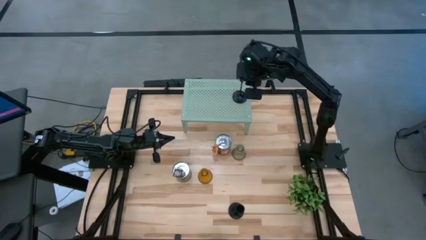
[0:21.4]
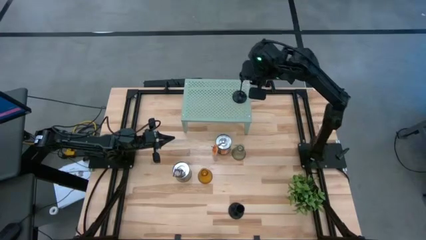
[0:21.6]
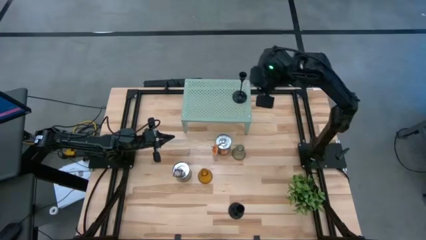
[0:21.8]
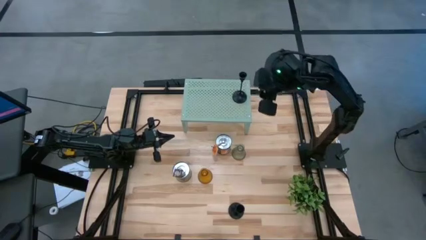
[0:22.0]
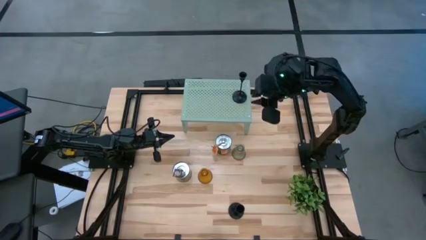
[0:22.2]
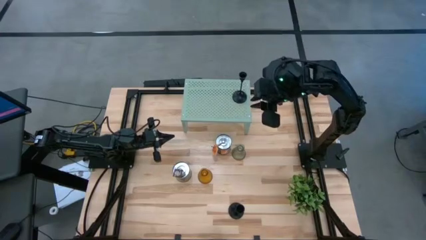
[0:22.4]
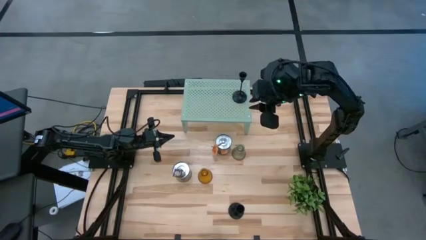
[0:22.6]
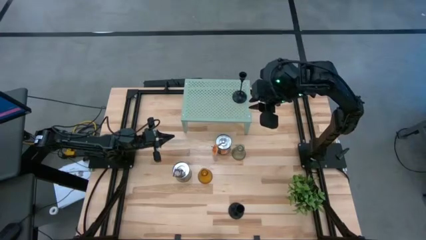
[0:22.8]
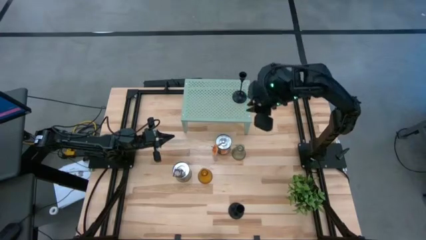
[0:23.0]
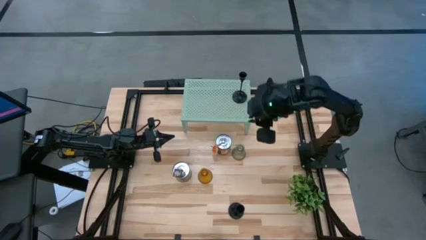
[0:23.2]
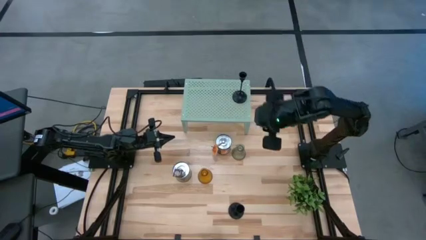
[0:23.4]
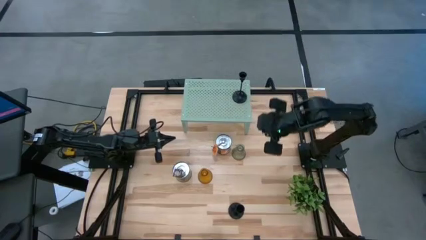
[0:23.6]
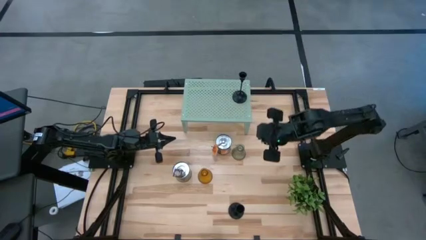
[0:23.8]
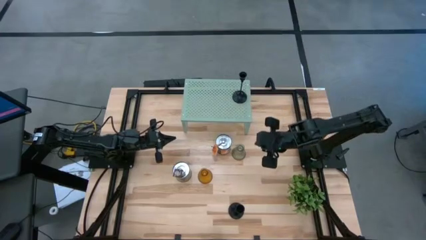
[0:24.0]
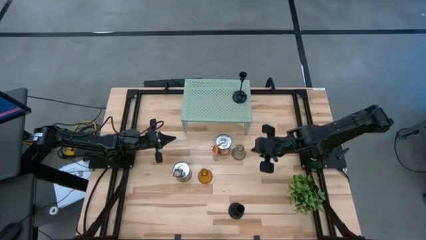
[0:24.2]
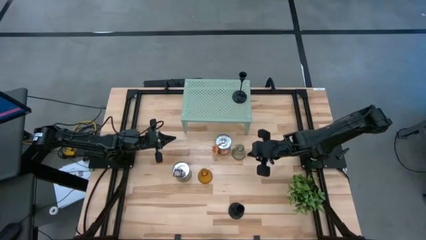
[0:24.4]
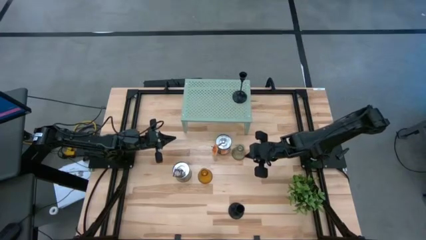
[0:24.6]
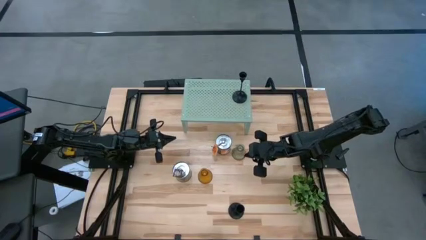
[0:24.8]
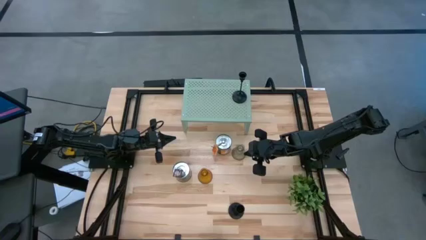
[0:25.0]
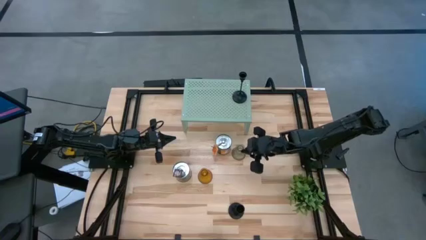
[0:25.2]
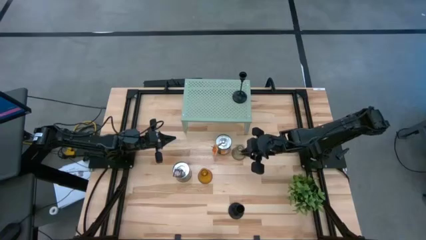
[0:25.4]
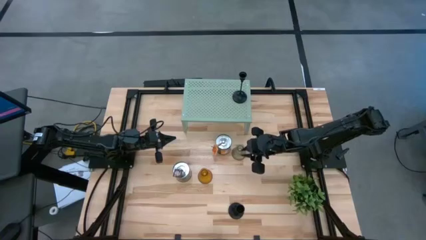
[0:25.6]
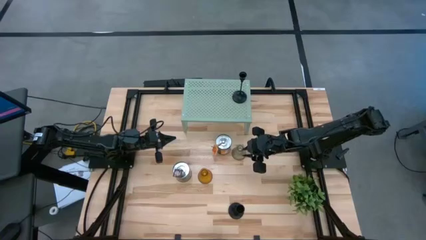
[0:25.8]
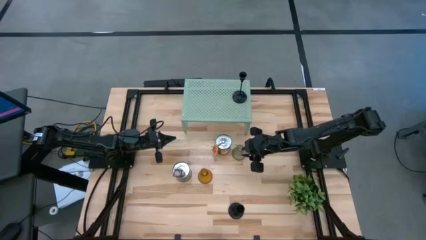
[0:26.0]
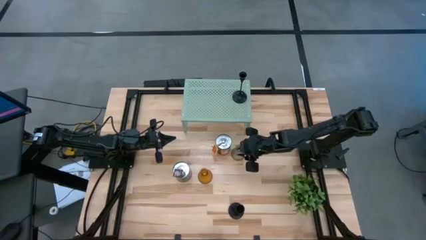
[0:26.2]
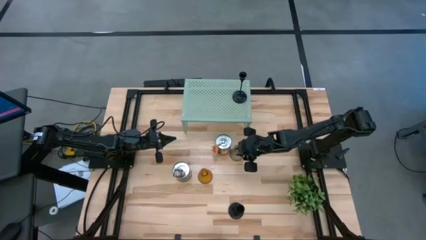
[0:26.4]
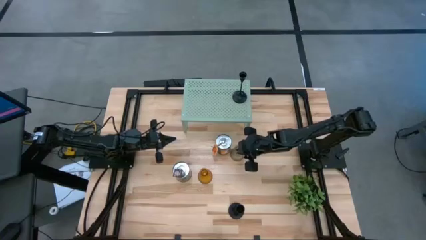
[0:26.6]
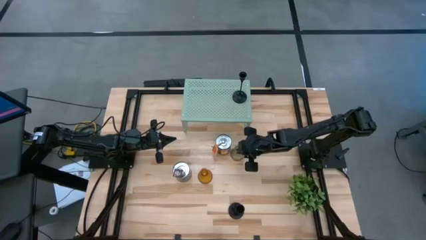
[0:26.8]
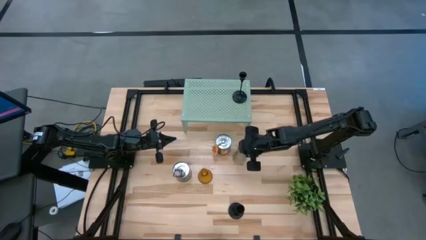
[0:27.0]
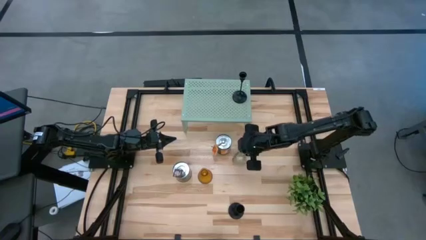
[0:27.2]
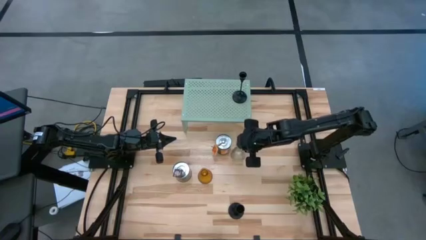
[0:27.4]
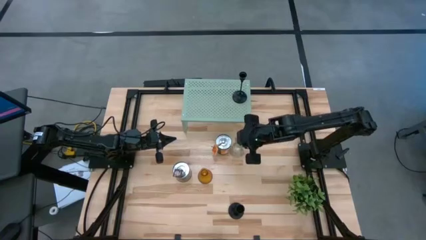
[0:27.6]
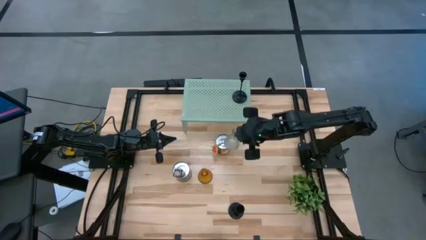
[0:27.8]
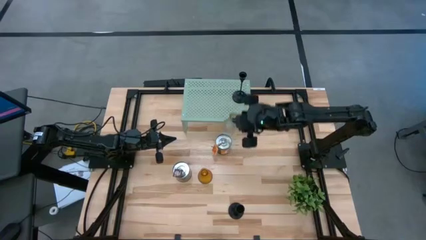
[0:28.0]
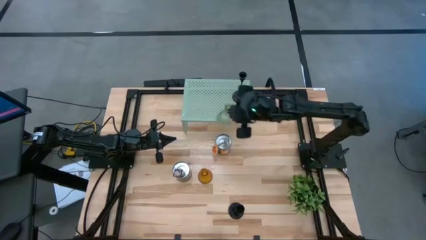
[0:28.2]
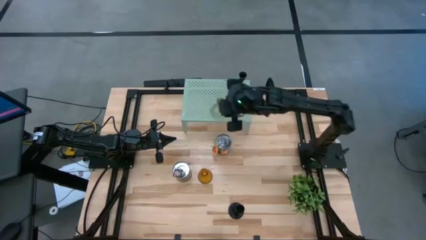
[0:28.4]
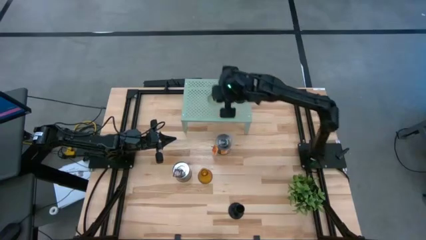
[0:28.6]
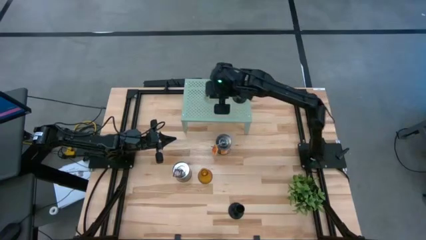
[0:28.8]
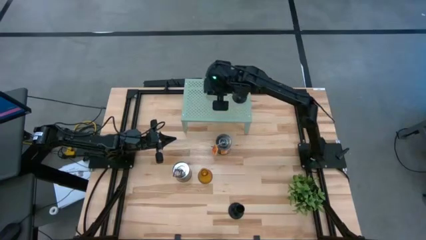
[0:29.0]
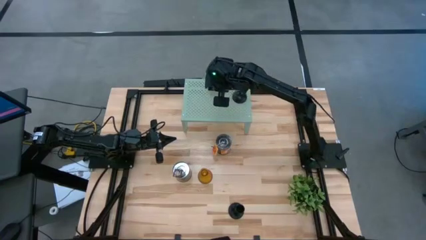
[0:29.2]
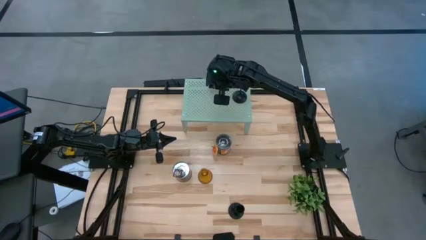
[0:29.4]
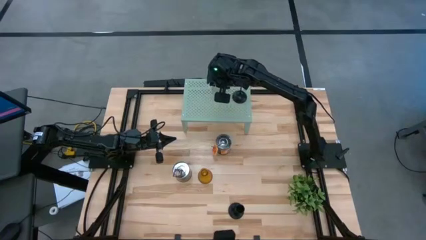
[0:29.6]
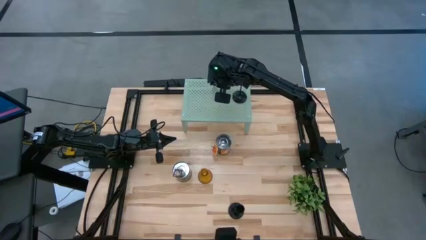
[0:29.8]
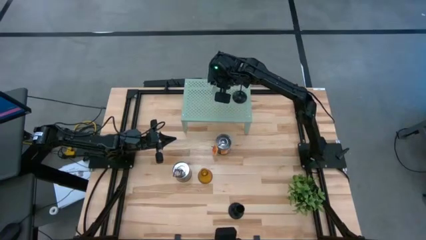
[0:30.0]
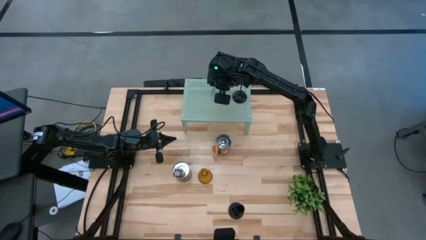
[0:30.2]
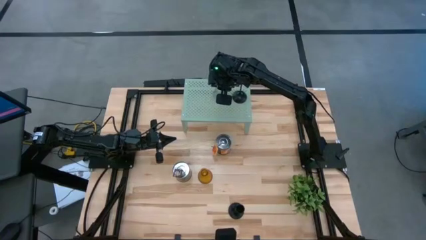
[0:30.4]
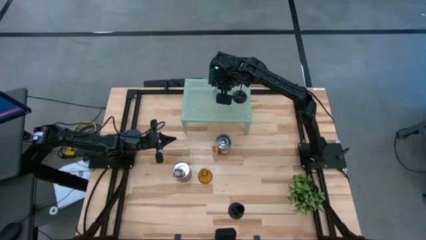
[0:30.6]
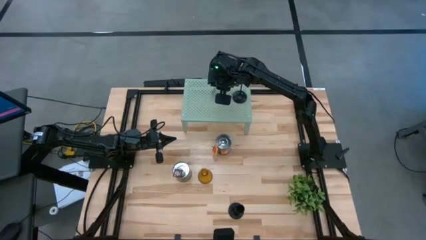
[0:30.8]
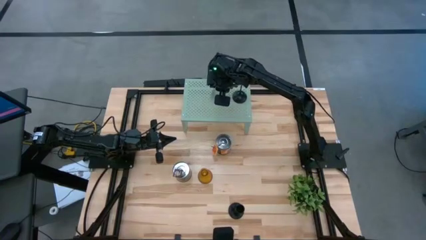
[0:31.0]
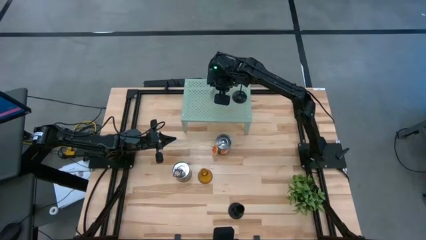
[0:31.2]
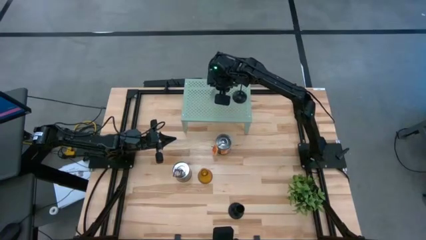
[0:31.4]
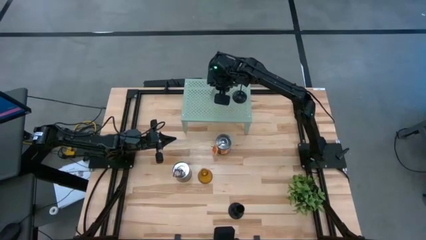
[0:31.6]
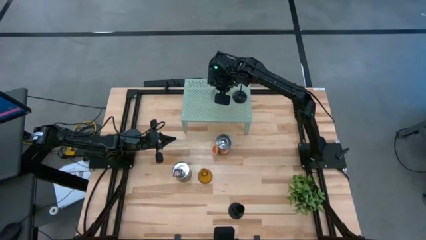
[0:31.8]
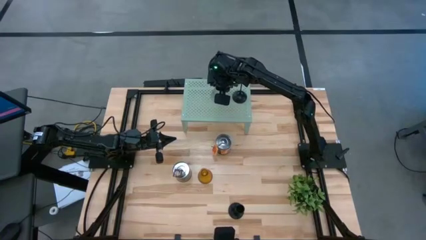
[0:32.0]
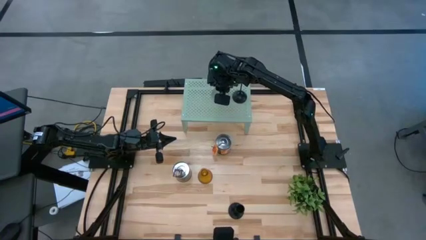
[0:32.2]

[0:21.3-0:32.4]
Task: Pick & Place candle stick holders
Put the green candle holder on the shelf

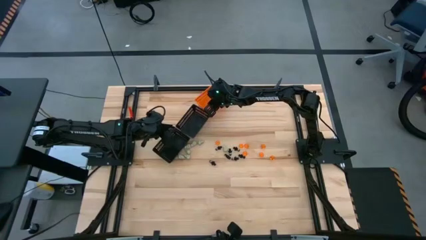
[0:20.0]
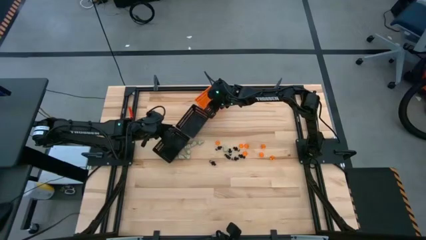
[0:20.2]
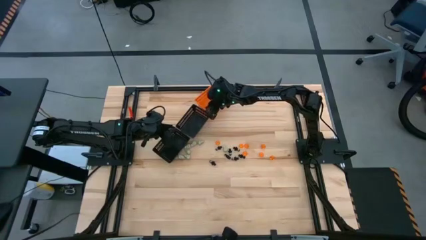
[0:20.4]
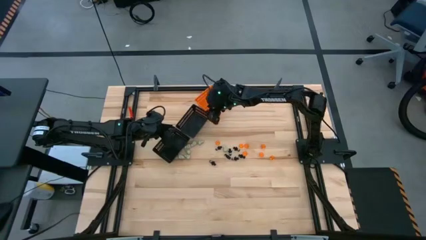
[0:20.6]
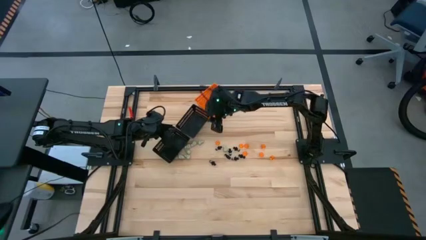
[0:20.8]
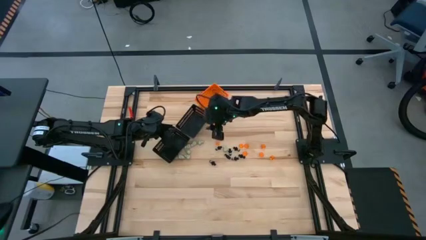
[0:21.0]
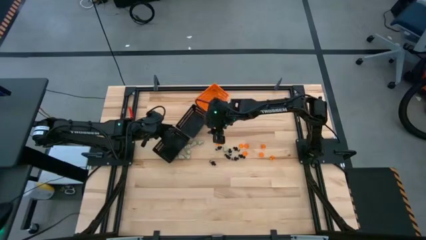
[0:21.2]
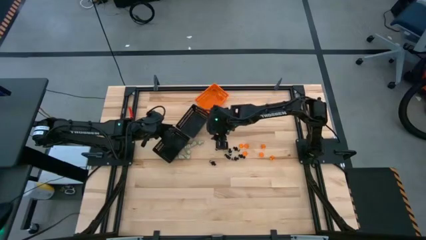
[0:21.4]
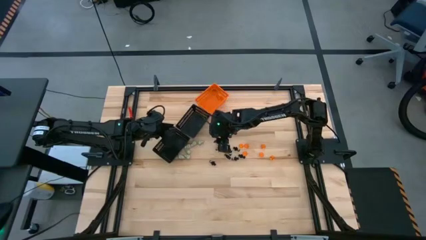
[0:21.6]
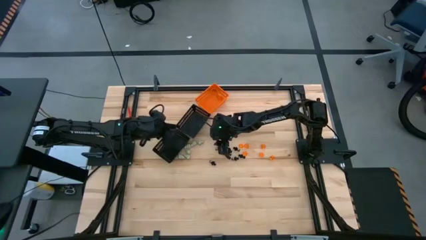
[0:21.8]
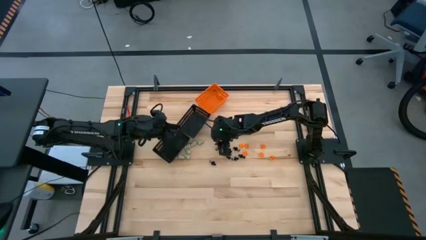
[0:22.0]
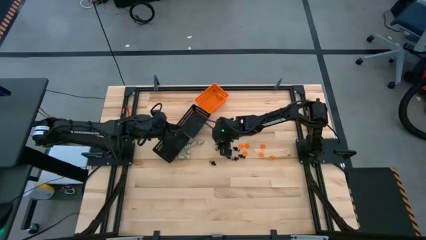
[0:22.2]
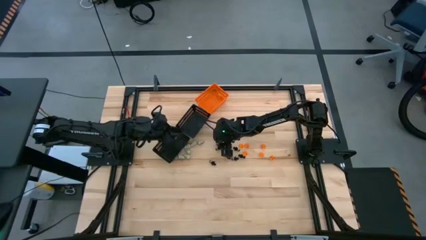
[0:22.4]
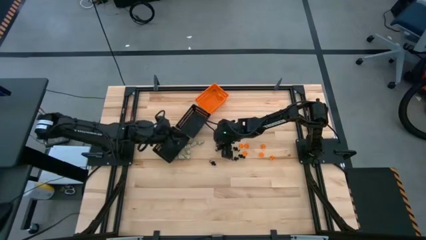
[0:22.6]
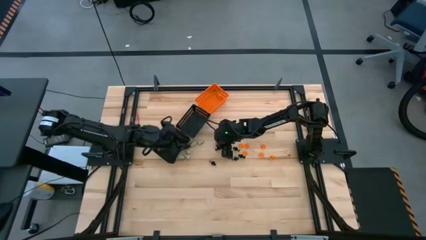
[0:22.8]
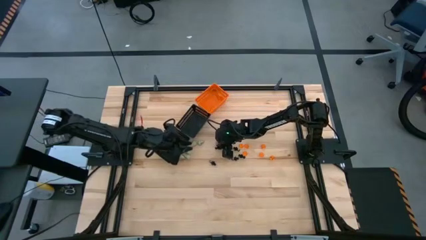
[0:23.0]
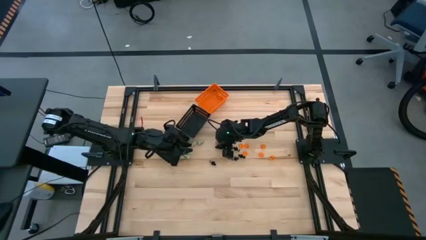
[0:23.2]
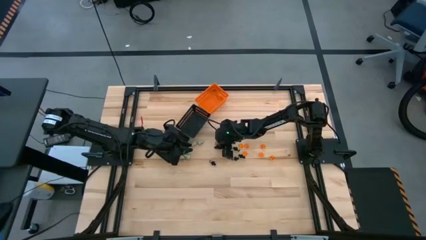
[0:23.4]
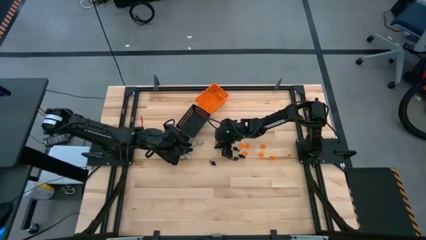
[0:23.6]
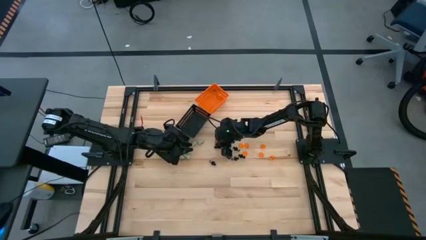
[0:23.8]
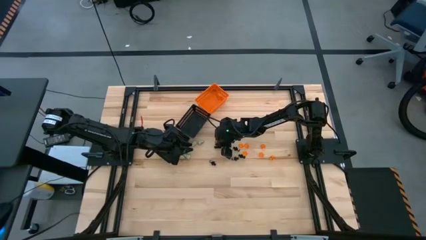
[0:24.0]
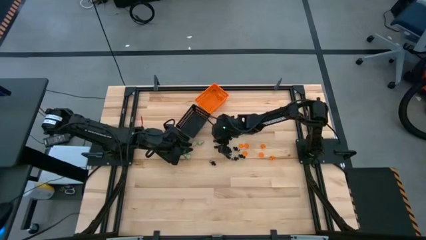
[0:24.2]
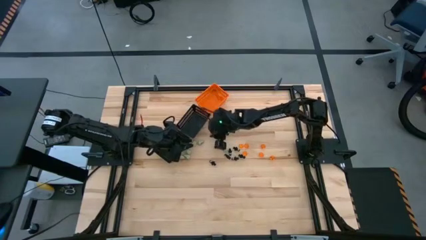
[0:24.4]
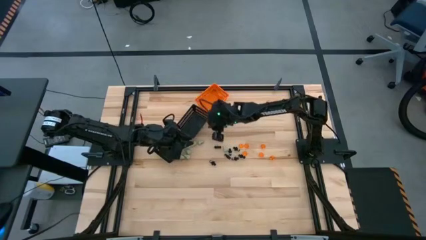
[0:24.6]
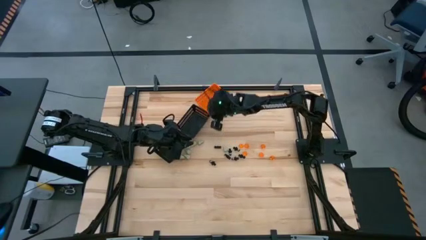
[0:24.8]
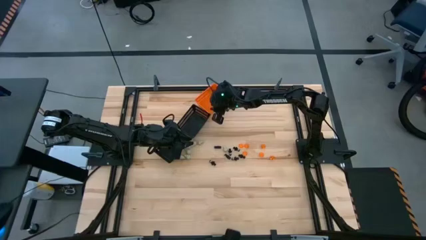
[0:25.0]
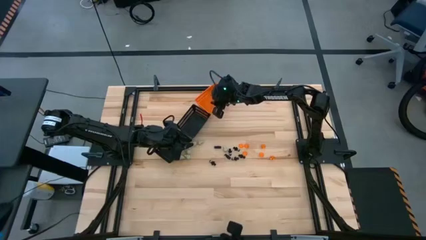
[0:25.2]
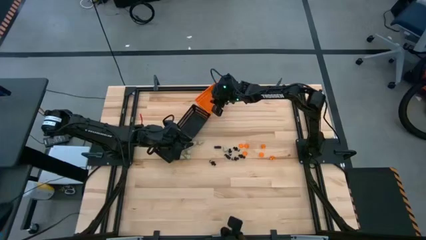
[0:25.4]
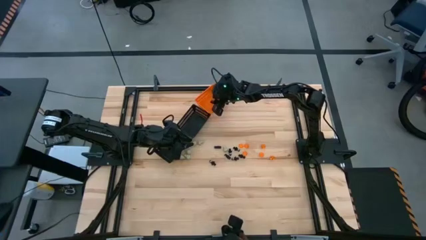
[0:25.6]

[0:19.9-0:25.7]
Task: Sort Halloween decoration
Put the orange pumpkin toy into the orange bin
